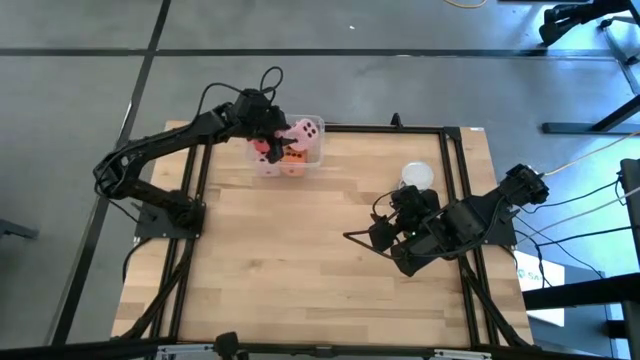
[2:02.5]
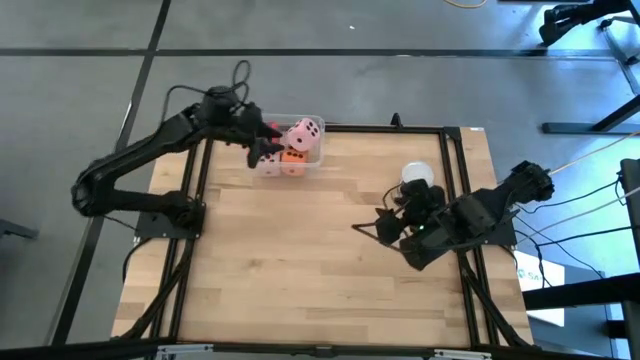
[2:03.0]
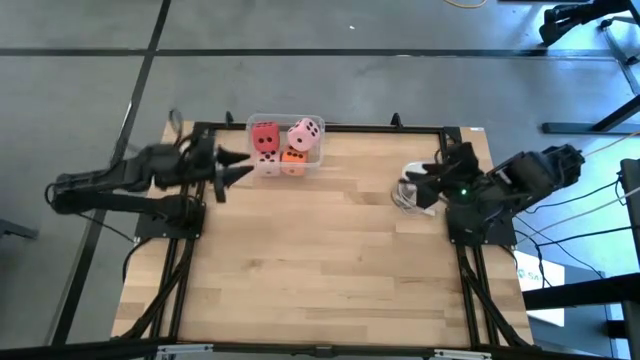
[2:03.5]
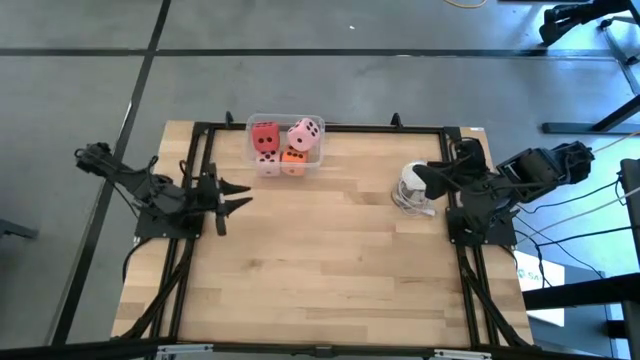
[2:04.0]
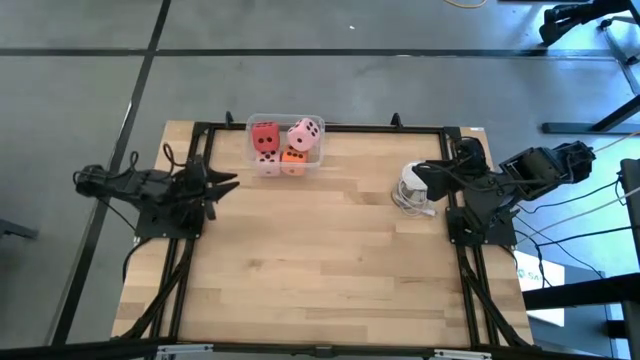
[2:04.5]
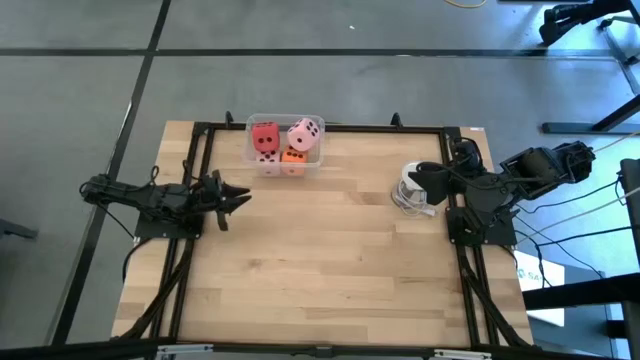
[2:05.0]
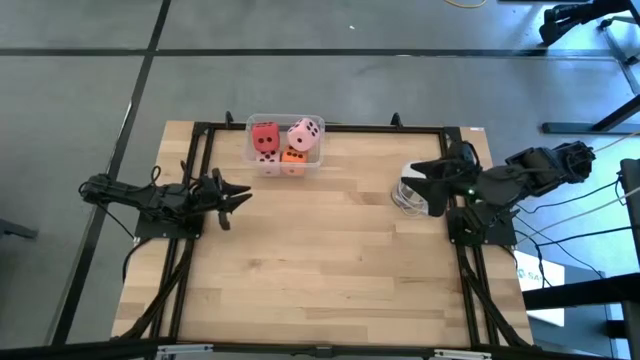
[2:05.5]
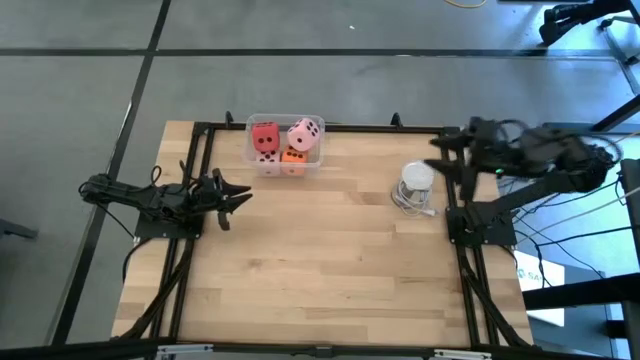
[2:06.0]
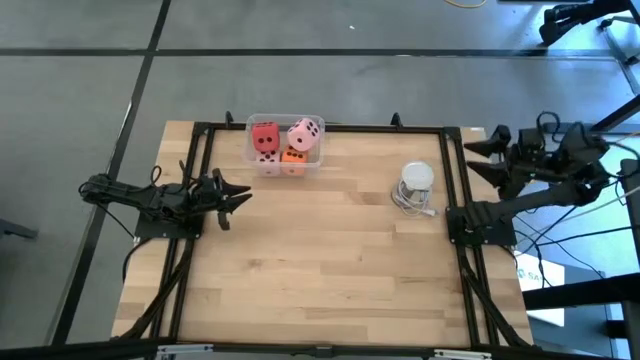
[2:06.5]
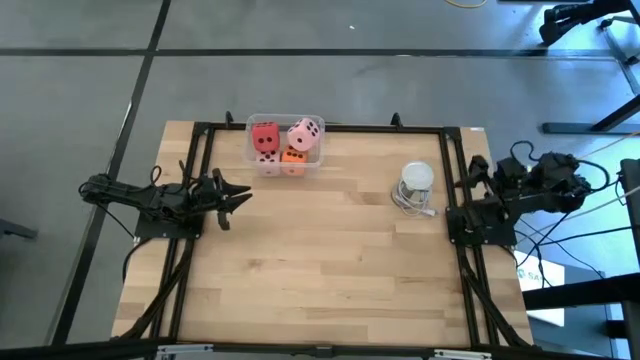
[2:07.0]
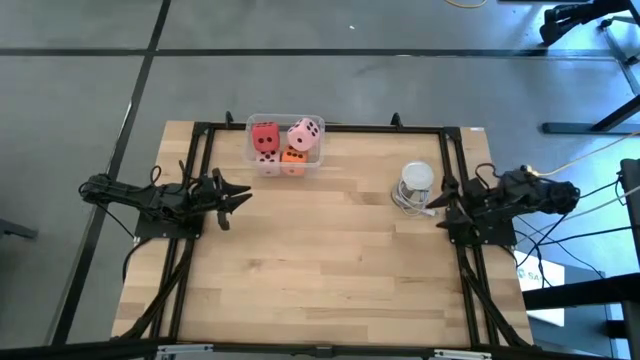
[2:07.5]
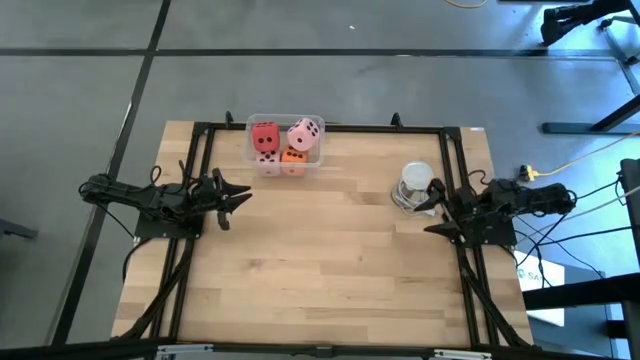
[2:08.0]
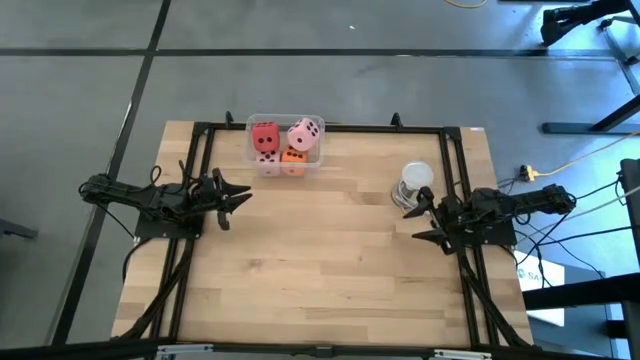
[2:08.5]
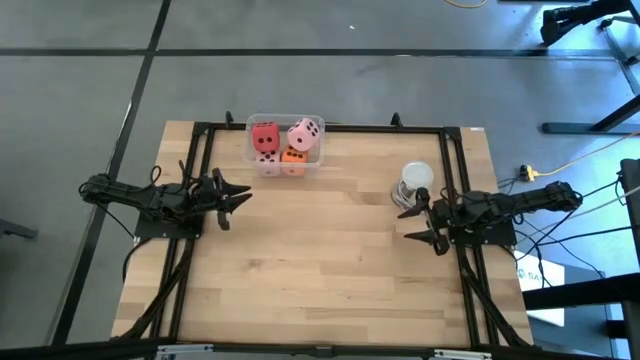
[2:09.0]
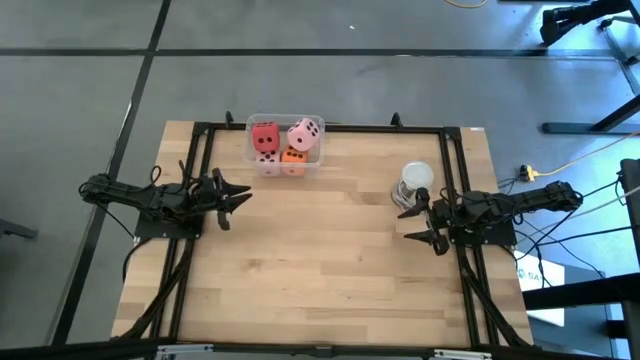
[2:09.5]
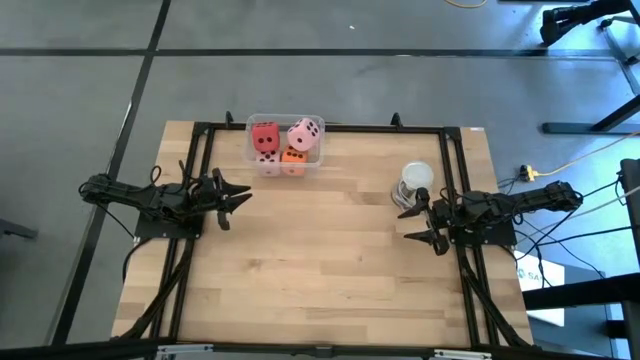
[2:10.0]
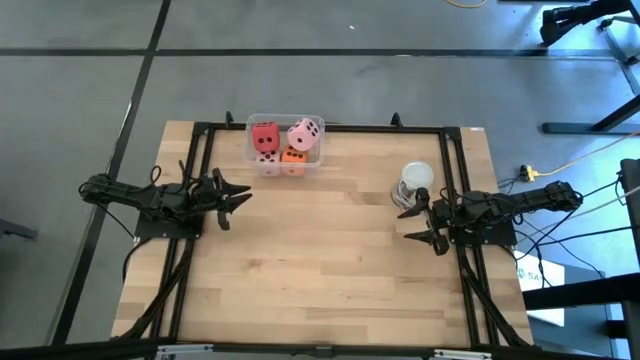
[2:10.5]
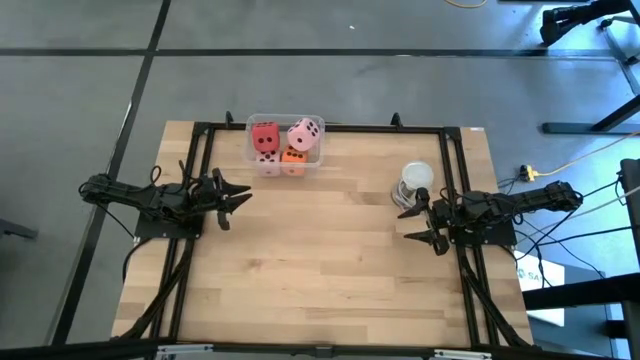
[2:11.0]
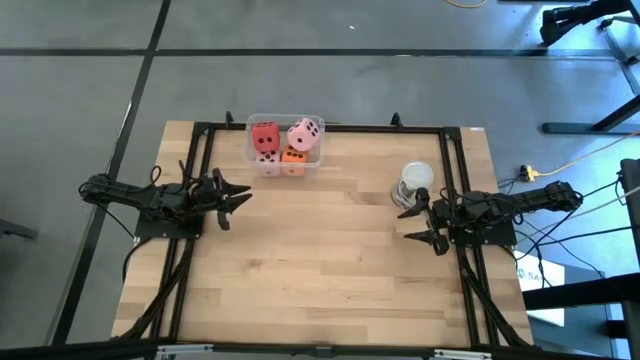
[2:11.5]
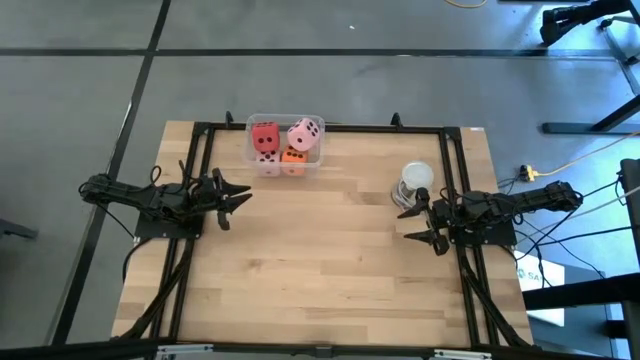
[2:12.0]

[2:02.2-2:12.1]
Task: Pick & Place Dice
Return to Home Position

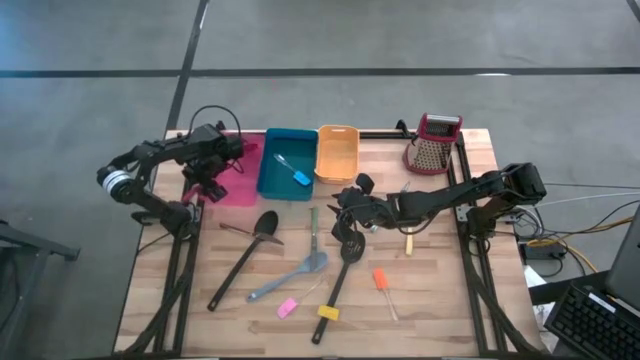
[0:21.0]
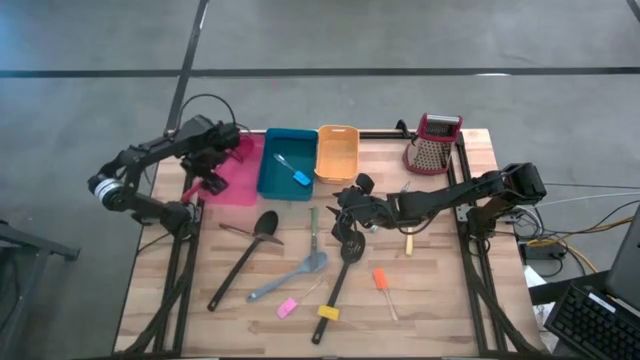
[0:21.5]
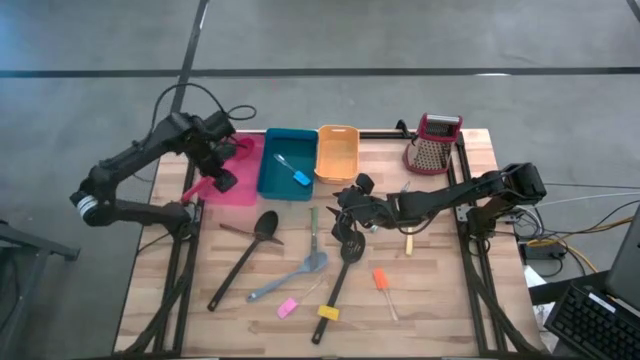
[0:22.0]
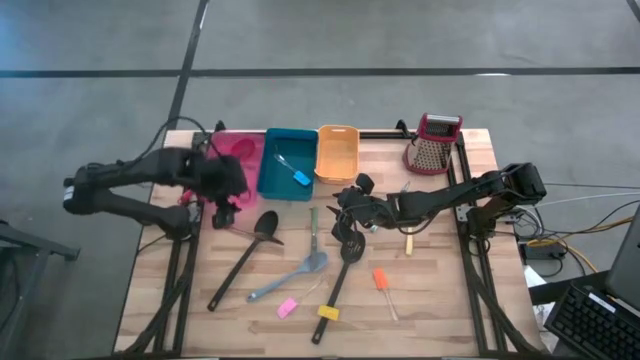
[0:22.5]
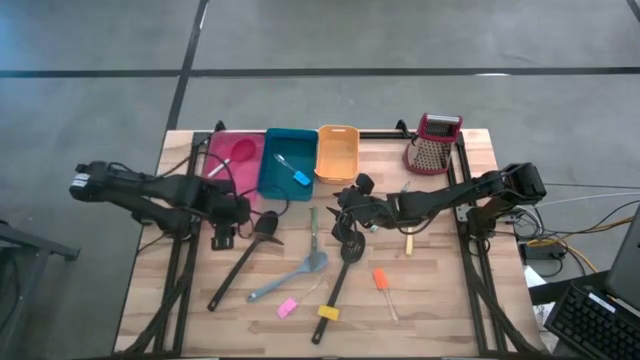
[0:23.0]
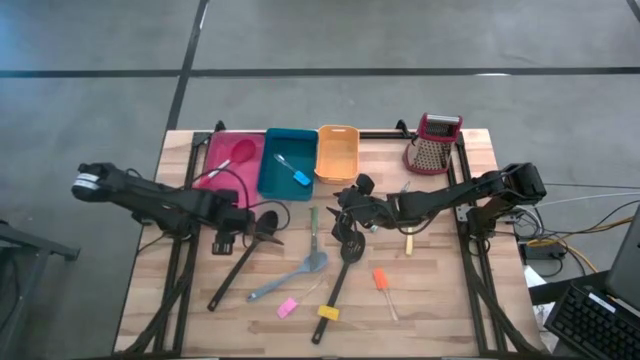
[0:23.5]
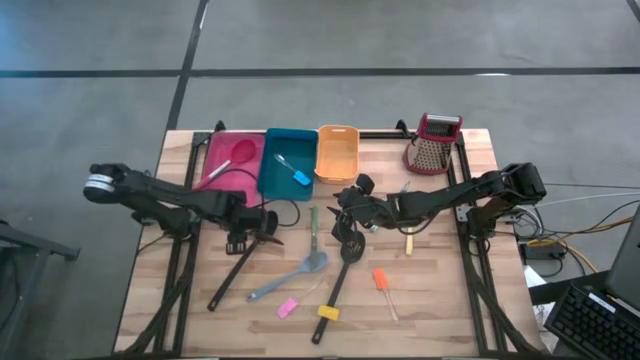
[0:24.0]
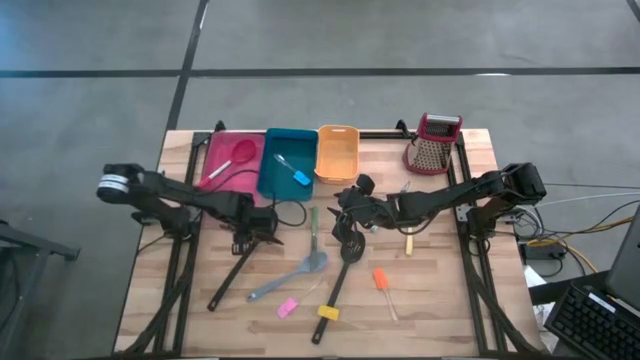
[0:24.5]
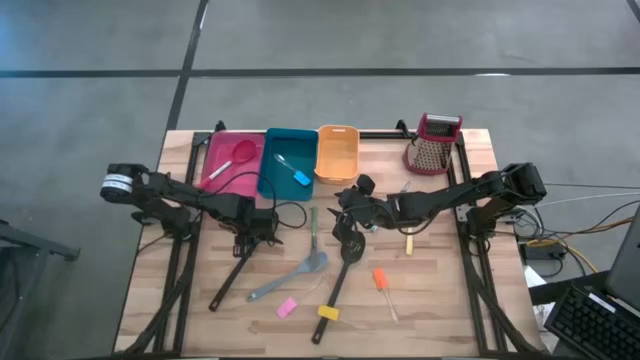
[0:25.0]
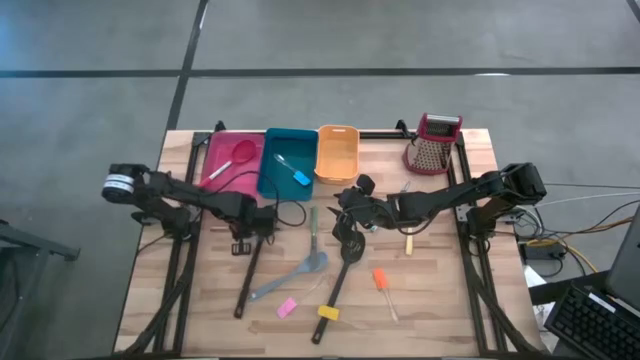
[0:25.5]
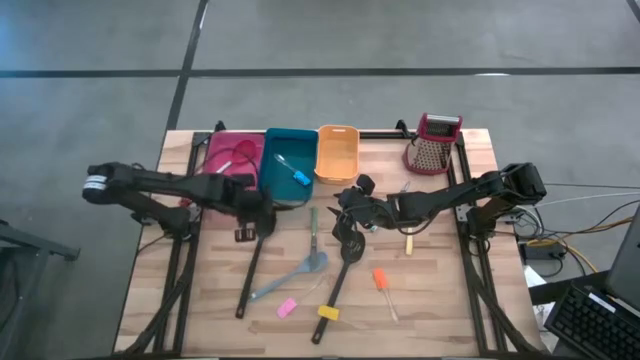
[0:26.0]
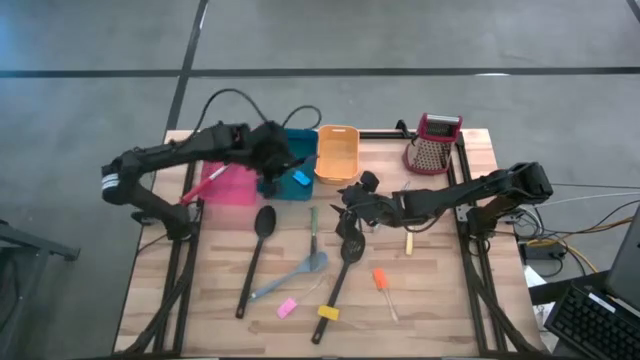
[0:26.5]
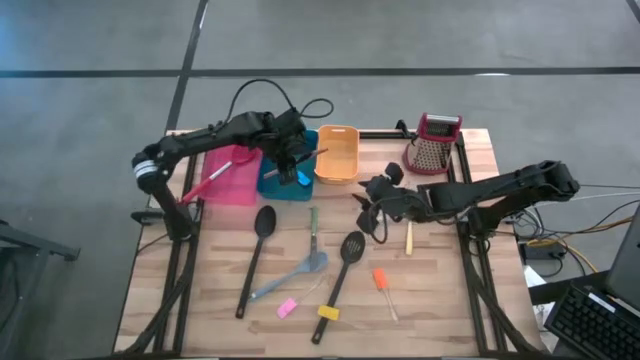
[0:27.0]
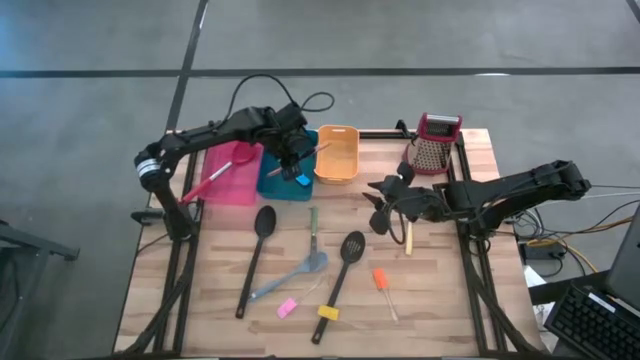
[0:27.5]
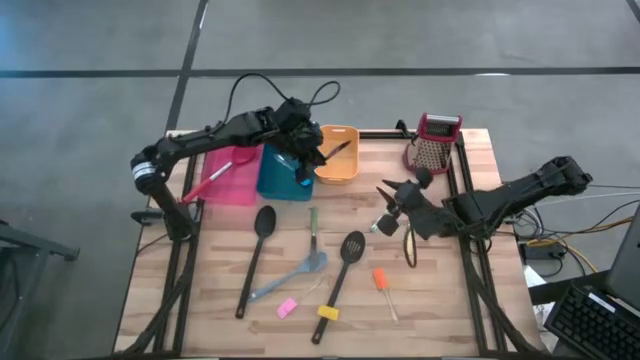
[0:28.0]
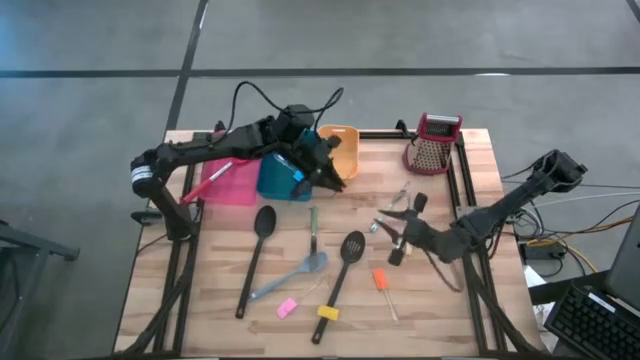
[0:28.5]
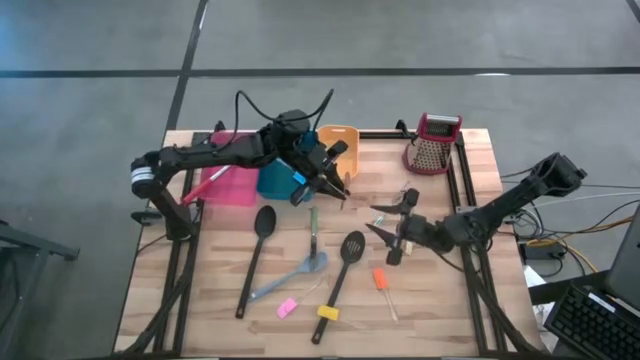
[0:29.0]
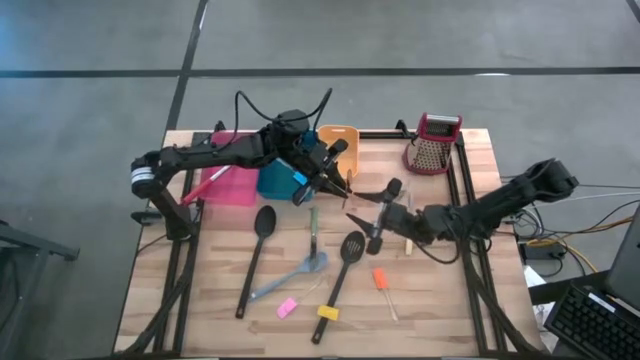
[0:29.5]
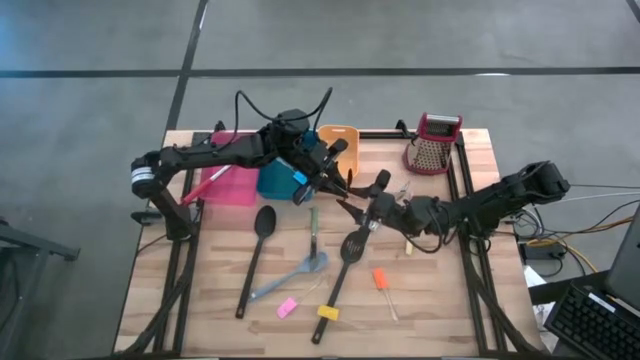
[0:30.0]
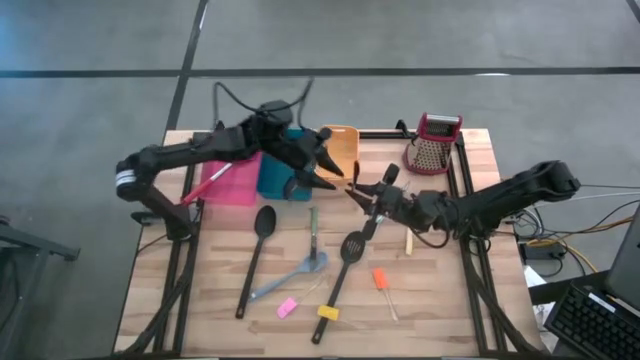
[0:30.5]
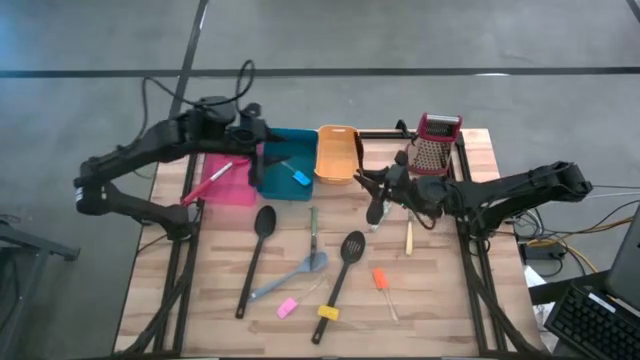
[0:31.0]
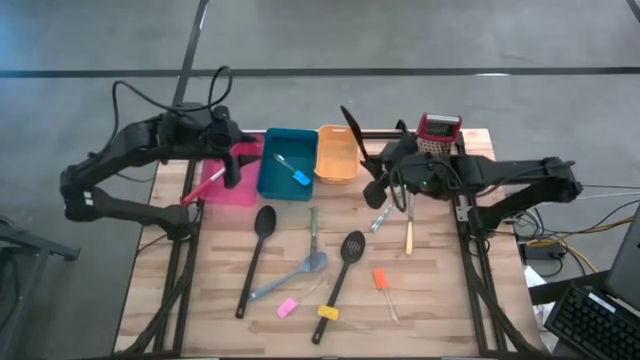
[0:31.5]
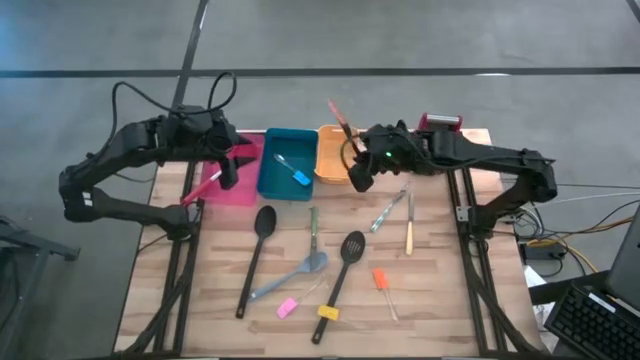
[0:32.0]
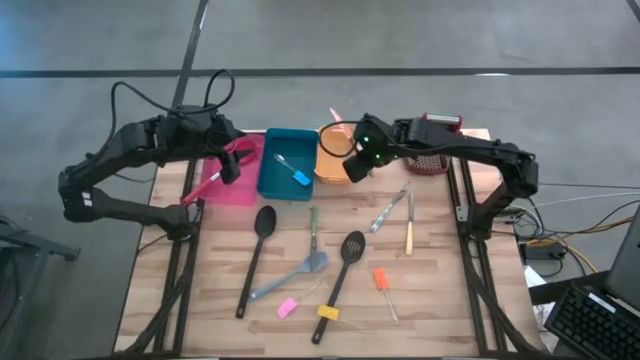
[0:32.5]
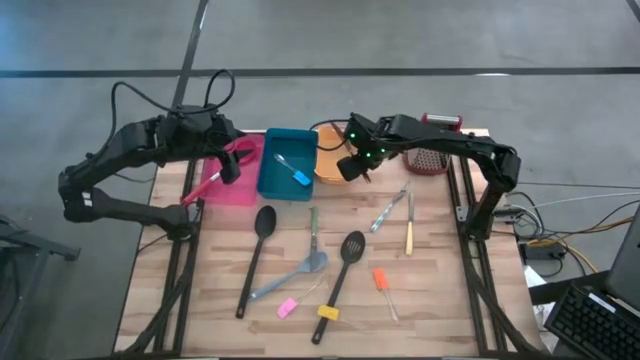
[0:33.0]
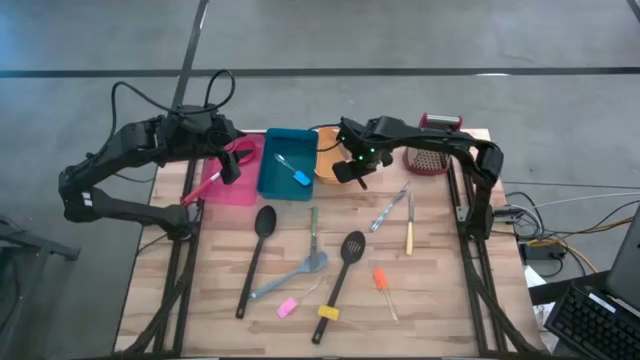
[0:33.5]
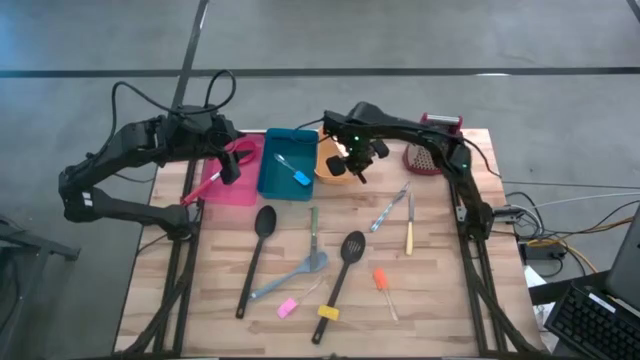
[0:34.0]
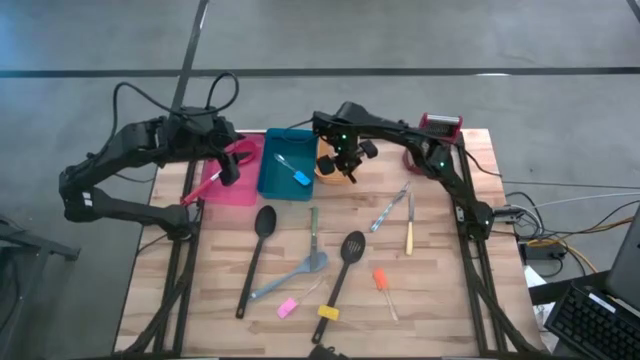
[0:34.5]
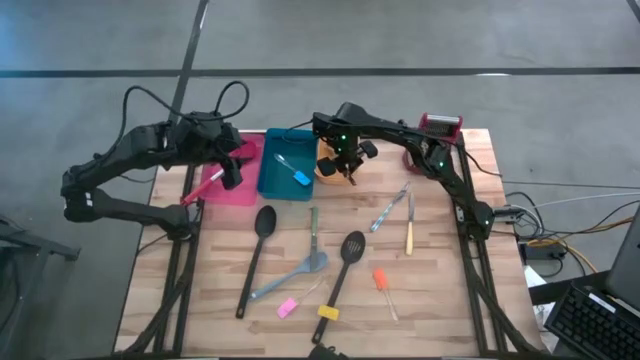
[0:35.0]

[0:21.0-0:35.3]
Task: Pick & Place Kitchen Items
Put the silver knife into the yellow bin
